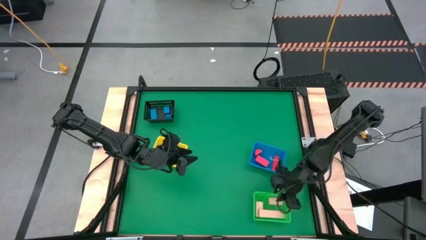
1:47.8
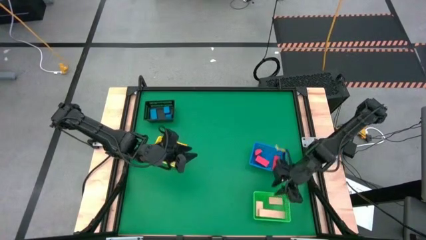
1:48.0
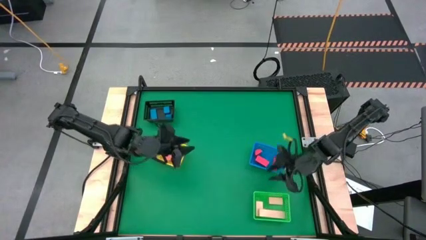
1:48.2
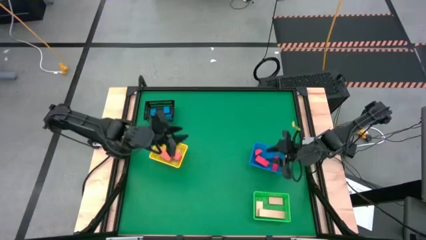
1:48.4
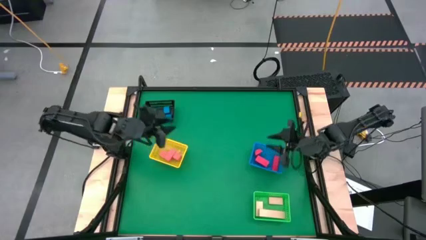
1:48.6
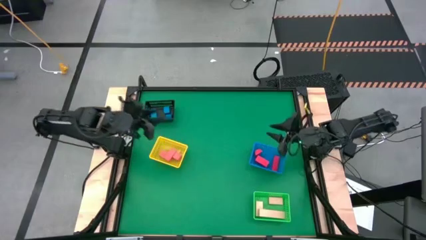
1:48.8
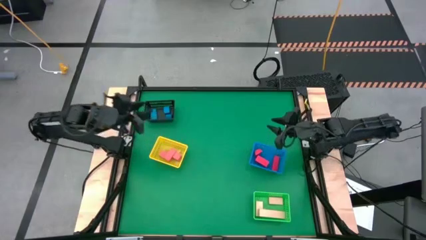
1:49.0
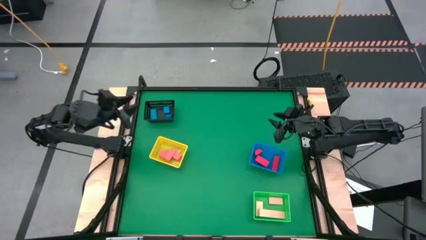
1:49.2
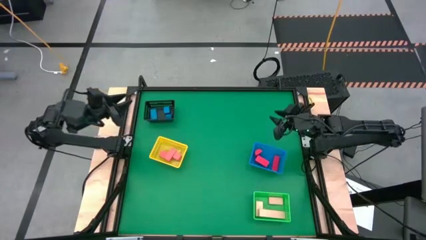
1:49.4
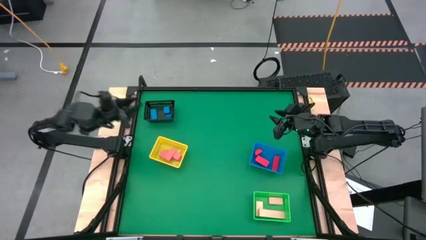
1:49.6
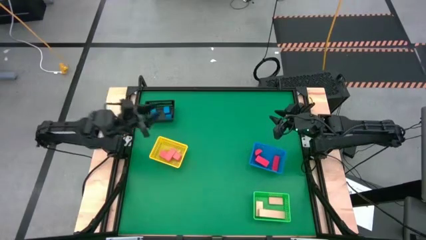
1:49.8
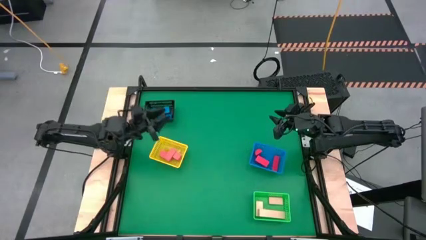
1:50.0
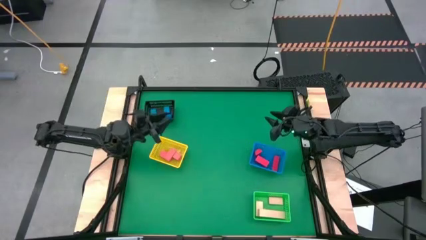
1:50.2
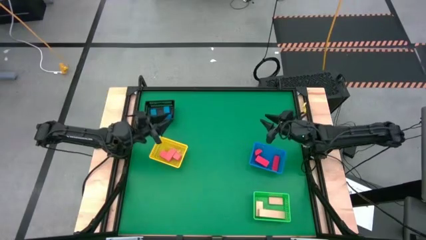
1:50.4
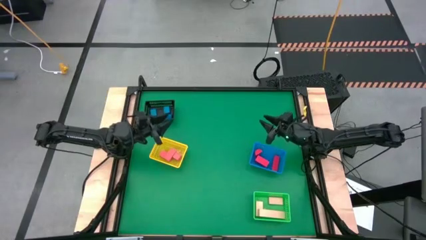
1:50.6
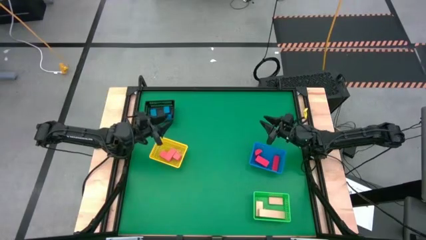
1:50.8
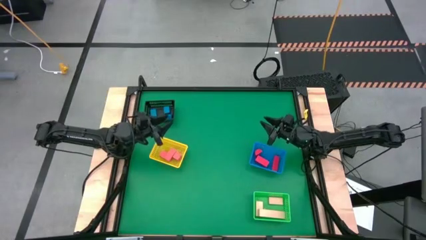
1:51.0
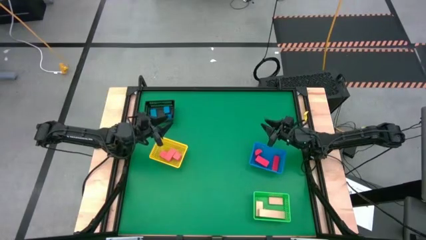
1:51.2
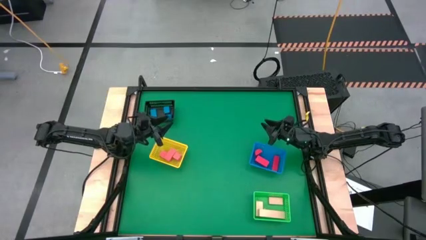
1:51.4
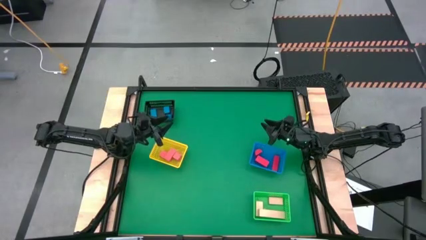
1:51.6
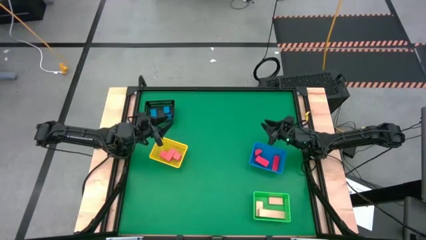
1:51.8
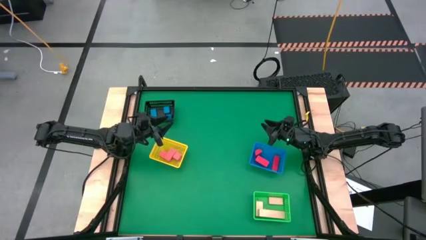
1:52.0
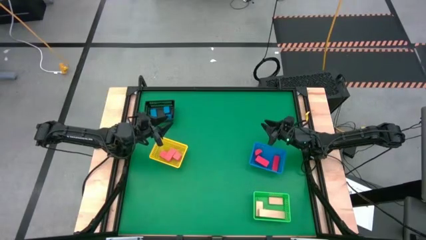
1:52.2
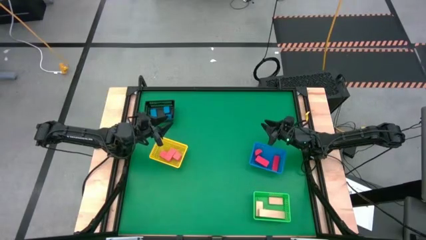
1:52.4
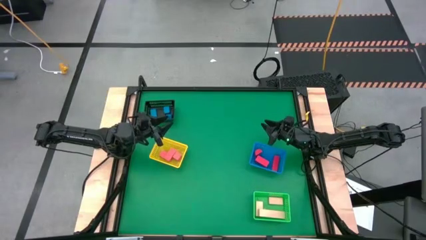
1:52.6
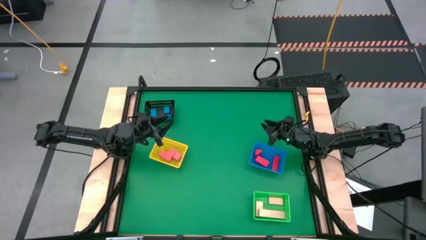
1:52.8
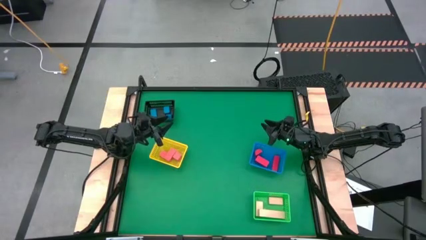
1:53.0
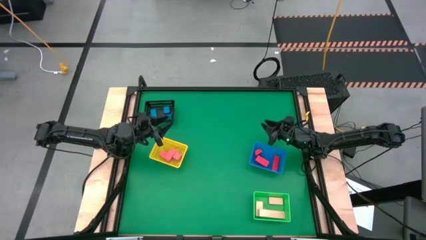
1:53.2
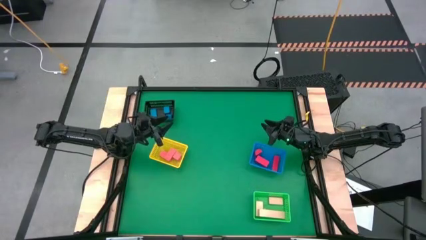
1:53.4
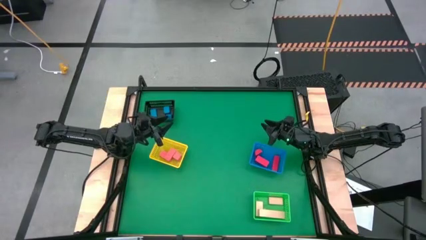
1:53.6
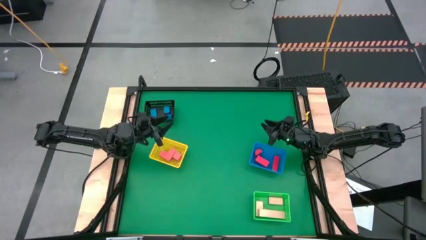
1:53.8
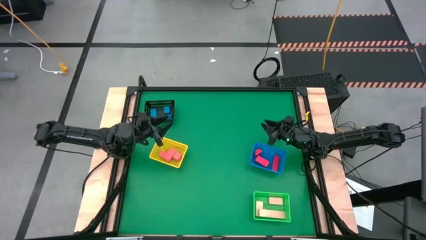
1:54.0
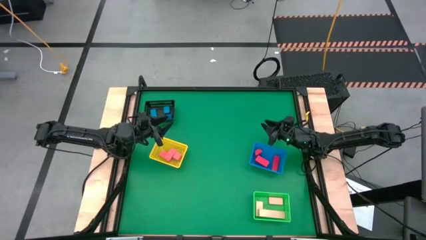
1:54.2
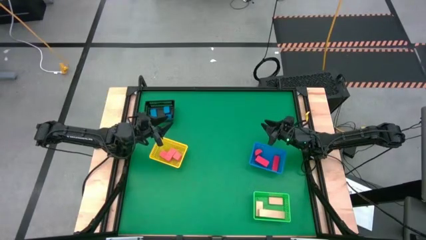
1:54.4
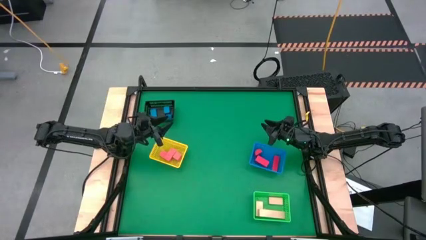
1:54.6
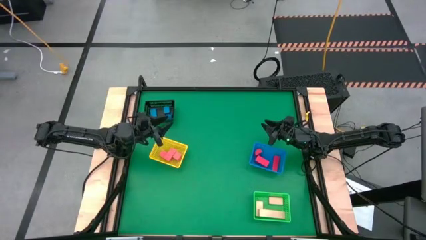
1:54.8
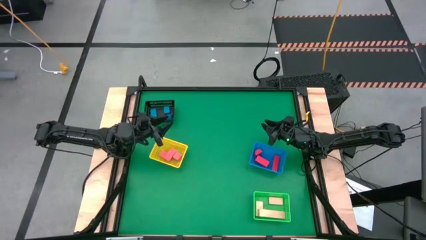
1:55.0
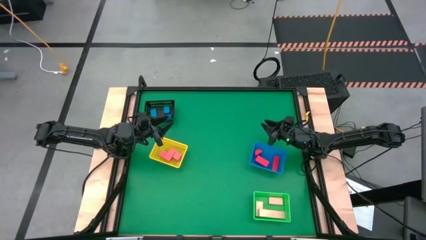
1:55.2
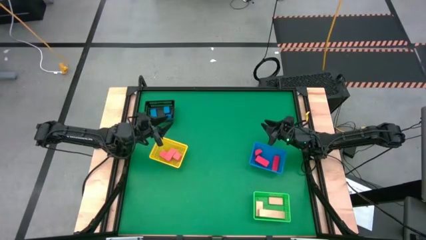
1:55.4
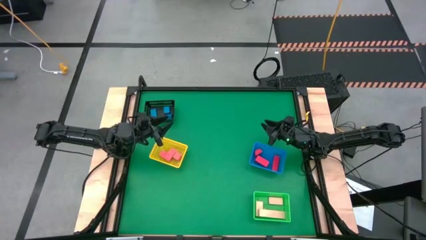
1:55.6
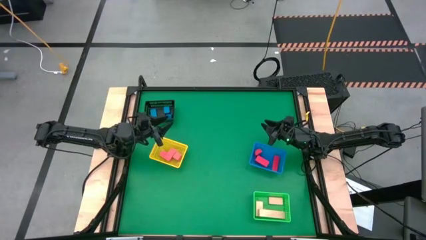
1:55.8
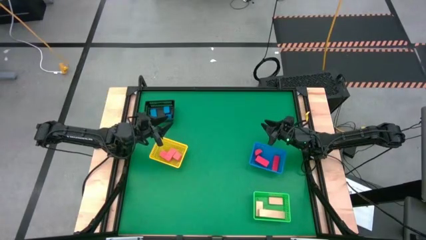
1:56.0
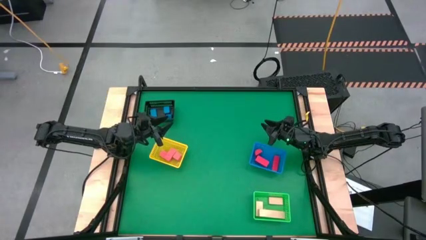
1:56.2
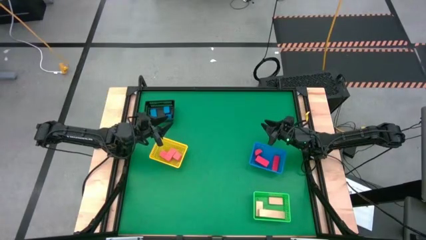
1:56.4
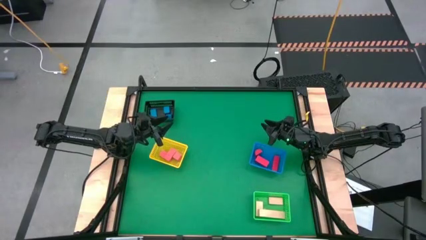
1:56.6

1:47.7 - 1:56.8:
Task: Sort & place blocks by color
Return to Home Position

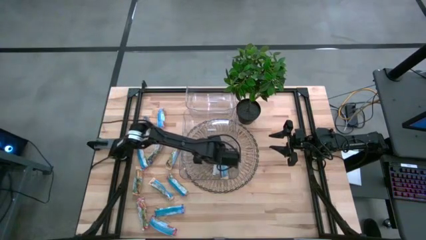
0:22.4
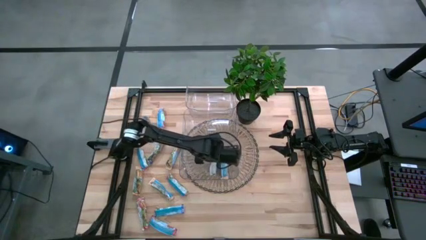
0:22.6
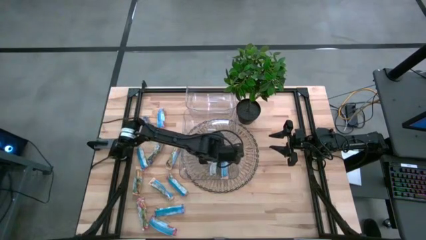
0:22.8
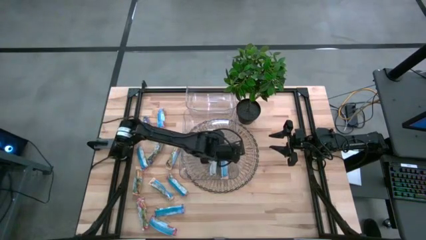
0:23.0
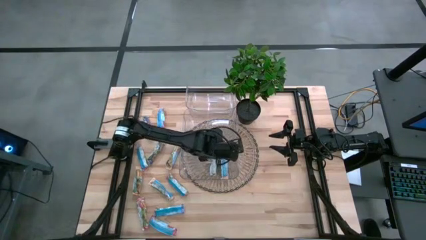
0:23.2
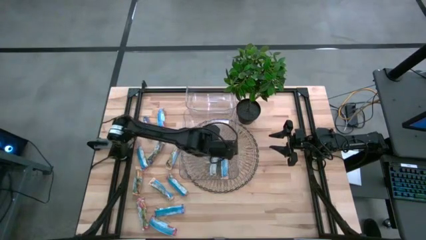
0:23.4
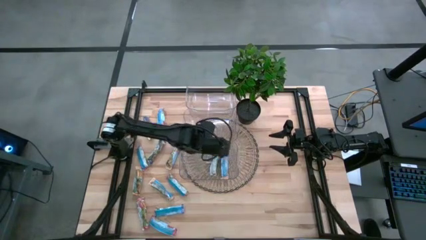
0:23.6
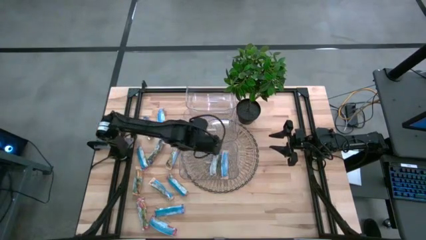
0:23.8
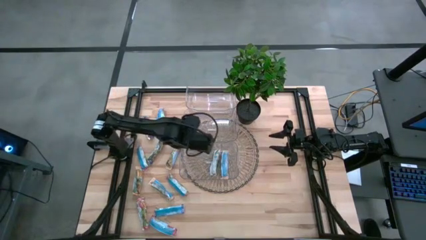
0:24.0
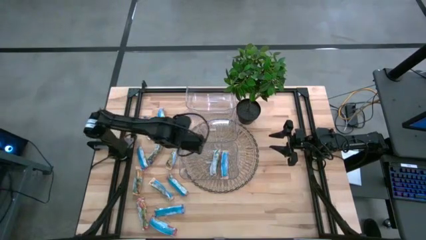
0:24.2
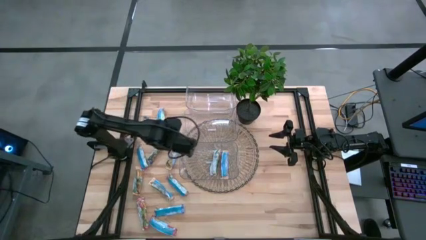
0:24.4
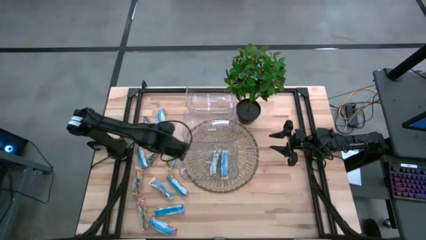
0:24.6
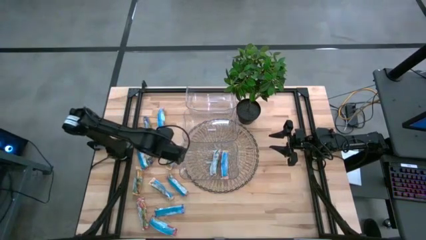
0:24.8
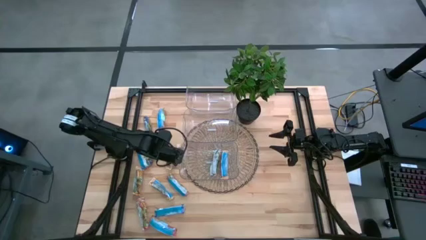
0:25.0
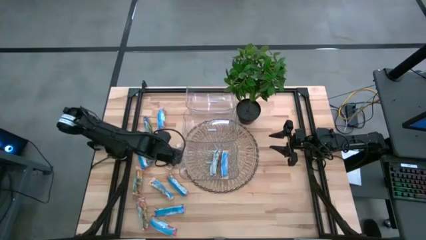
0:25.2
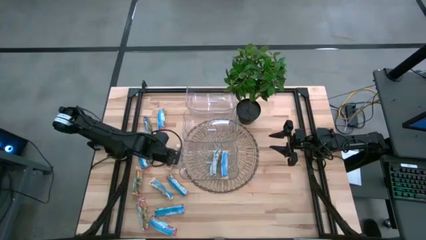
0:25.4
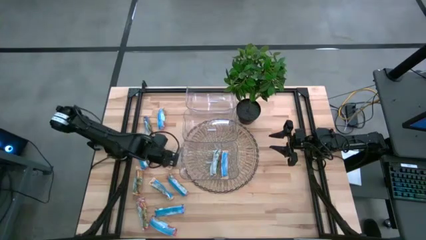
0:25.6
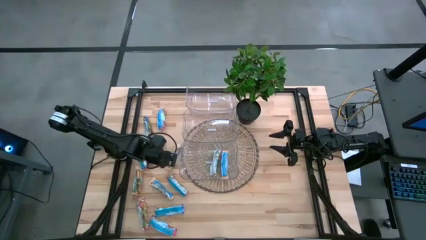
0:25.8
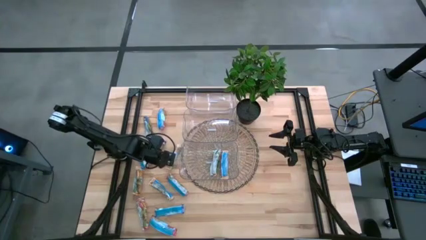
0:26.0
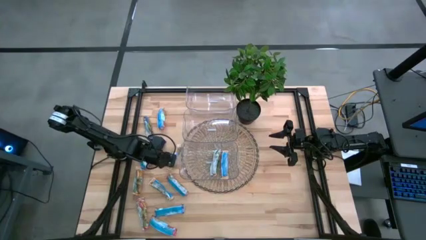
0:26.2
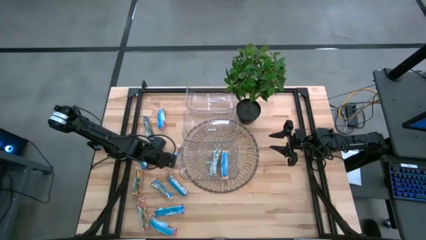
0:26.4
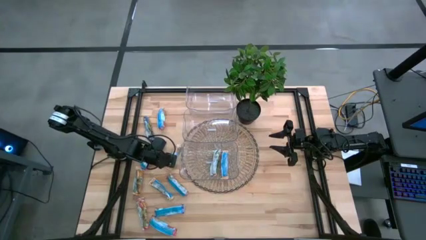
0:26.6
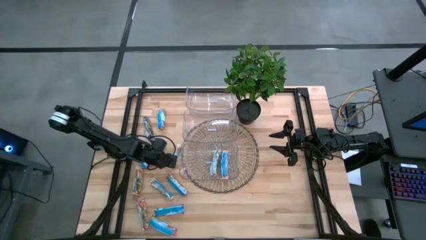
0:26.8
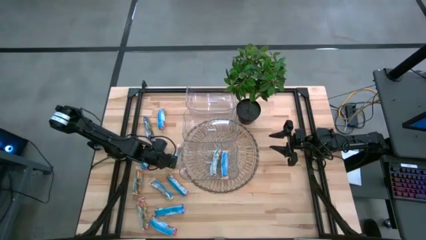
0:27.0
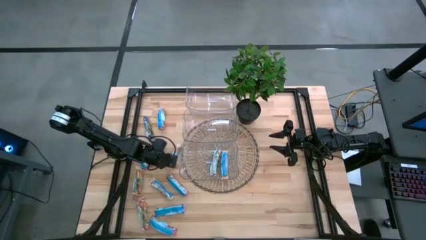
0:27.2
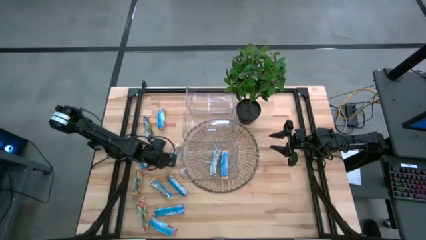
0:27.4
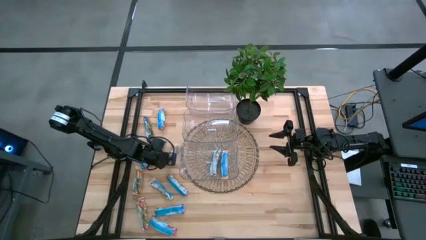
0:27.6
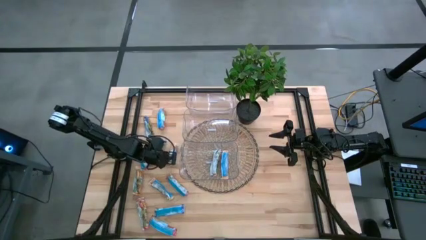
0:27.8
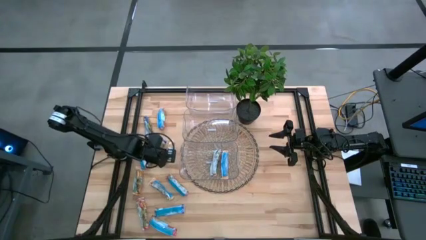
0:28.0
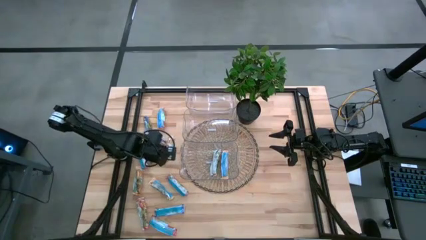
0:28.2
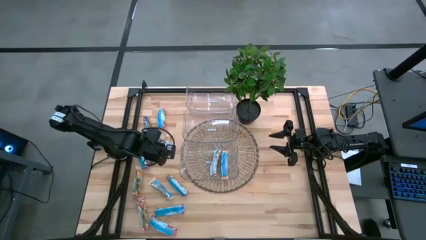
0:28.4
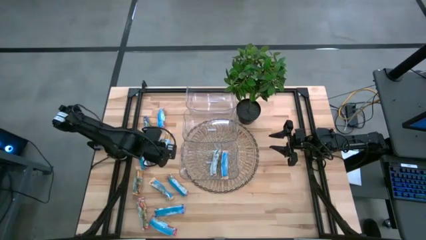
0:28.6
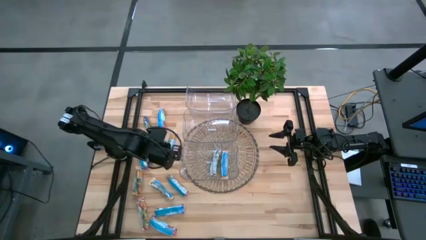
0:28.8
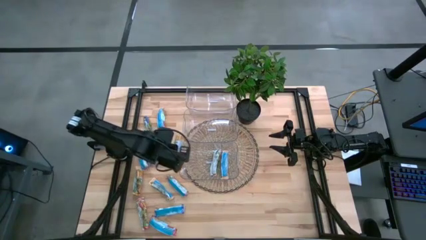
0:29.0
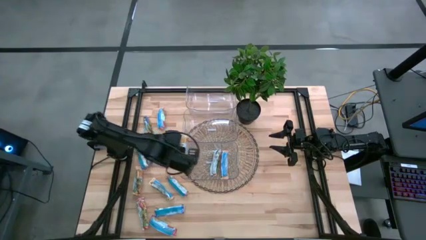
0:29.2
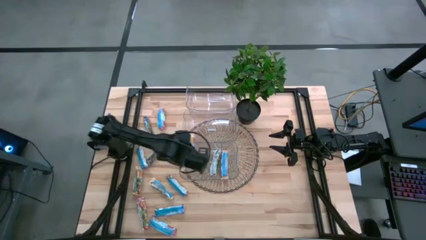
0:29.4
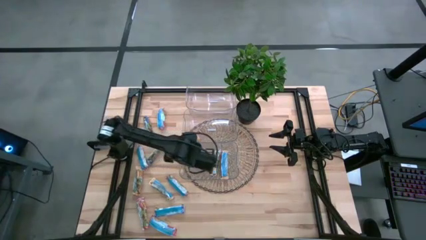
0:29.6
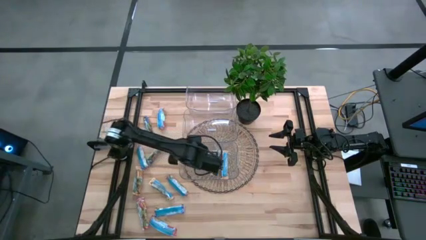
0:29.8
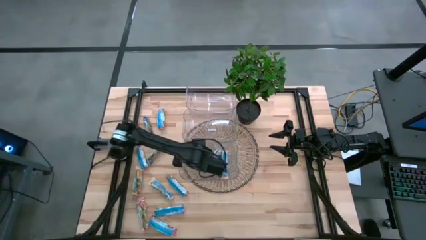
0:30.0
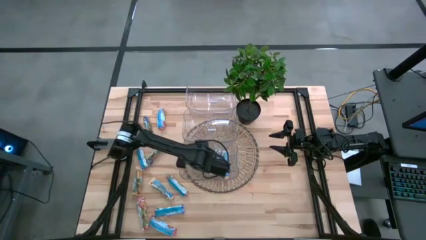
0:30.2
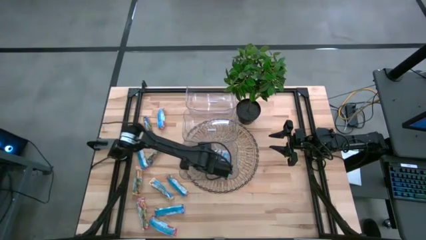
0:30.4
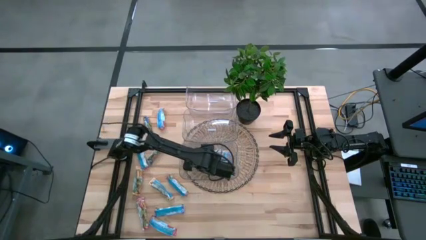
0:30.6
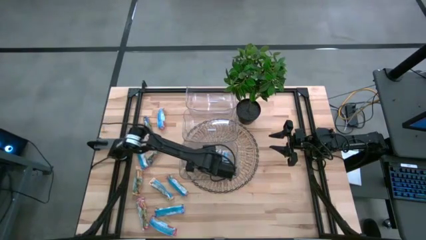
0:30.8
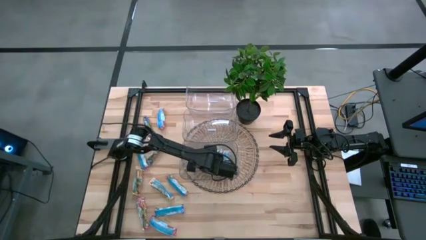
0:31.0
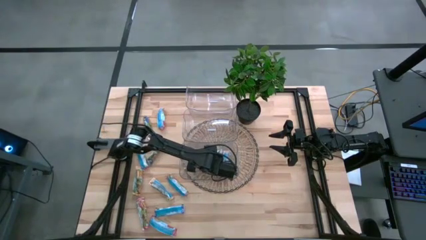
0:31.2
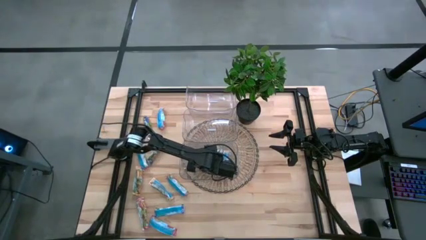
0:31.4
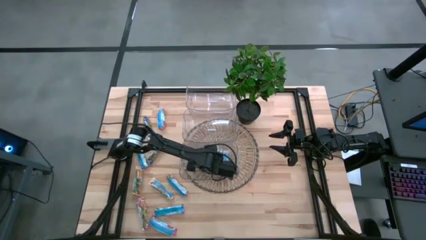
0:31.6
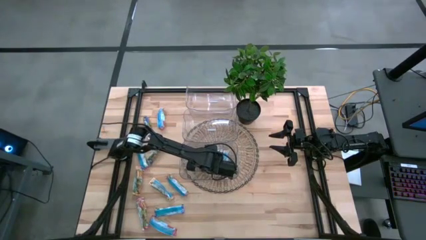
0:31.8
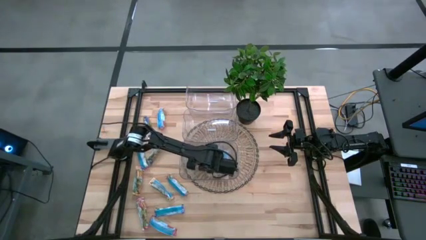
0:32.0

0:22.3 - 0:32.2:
Task: Pick and place Granola Bars by type
Put the yellow granola bar into the bottom transparent bin
